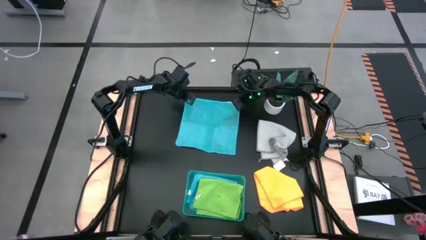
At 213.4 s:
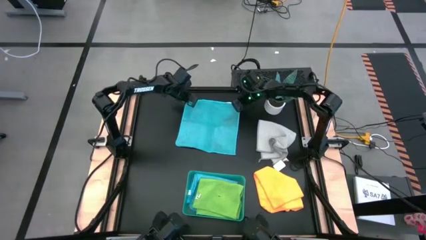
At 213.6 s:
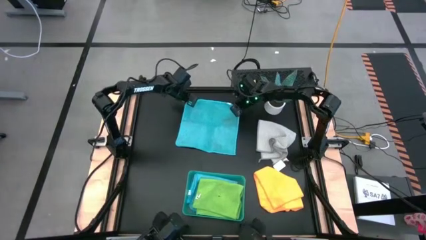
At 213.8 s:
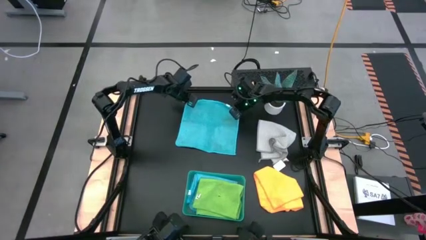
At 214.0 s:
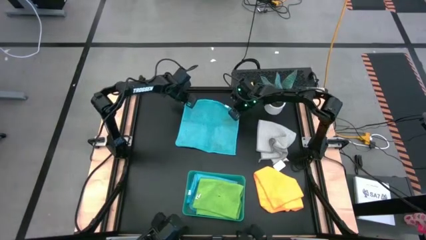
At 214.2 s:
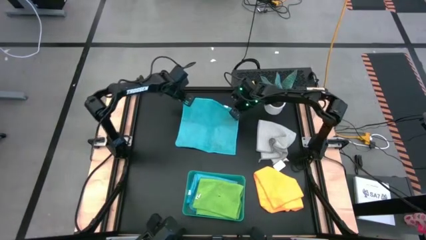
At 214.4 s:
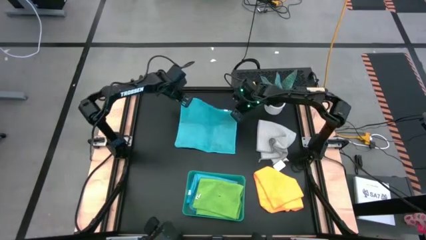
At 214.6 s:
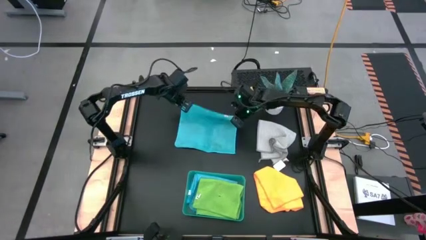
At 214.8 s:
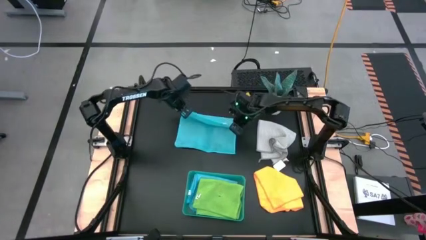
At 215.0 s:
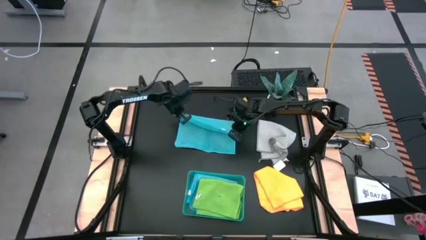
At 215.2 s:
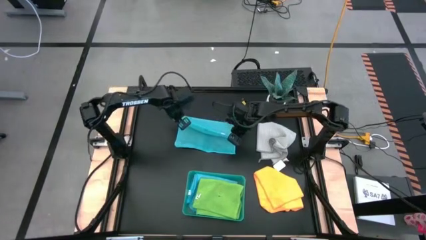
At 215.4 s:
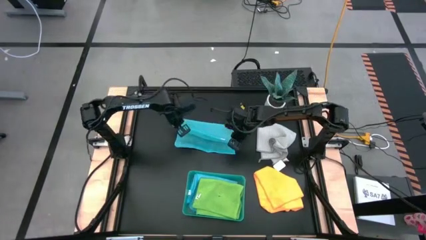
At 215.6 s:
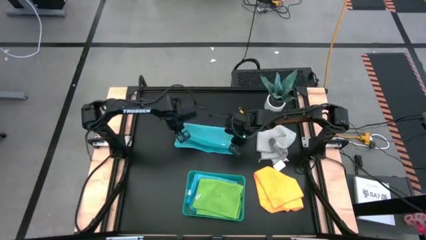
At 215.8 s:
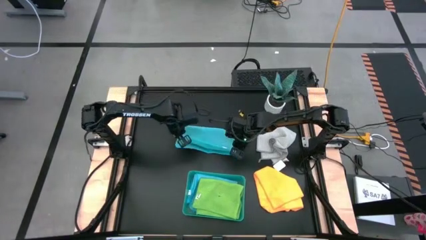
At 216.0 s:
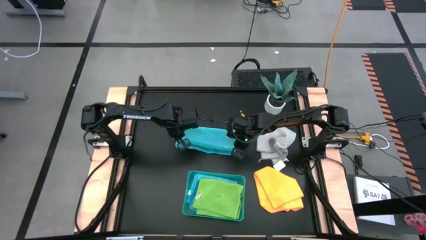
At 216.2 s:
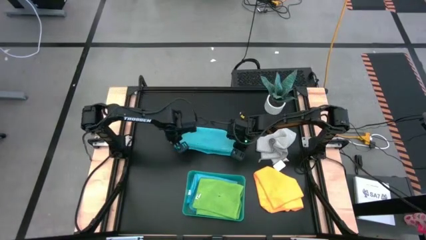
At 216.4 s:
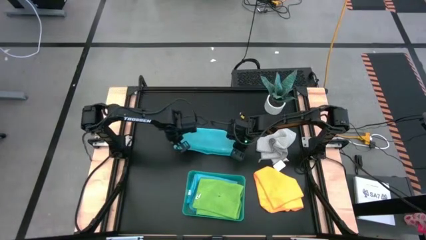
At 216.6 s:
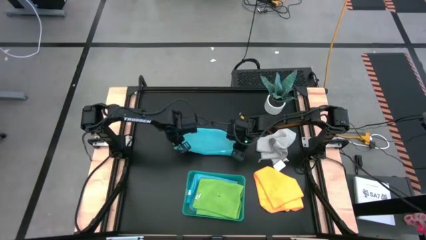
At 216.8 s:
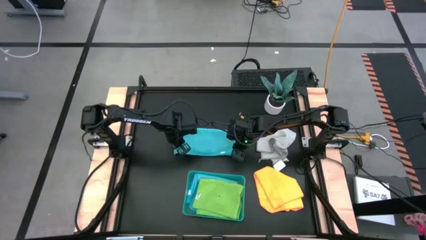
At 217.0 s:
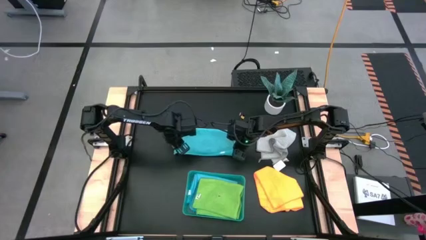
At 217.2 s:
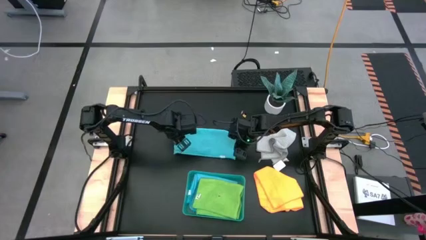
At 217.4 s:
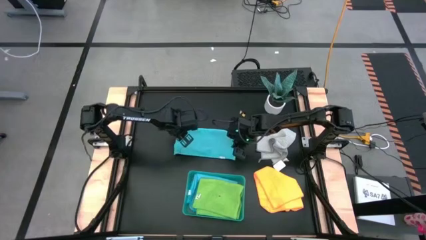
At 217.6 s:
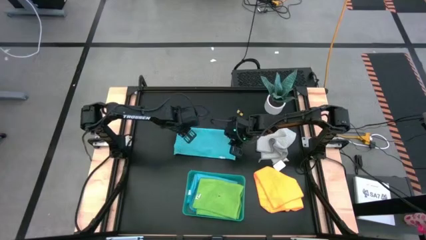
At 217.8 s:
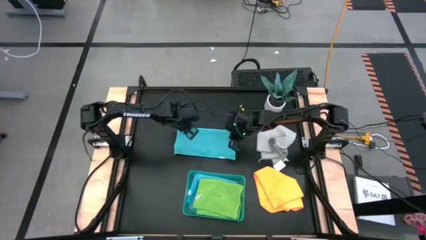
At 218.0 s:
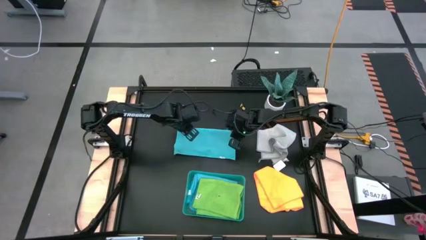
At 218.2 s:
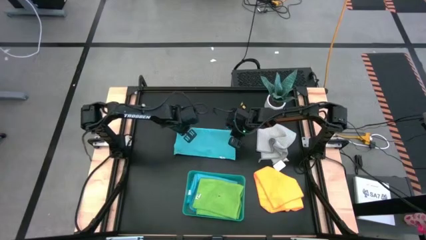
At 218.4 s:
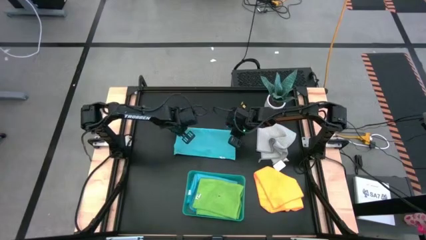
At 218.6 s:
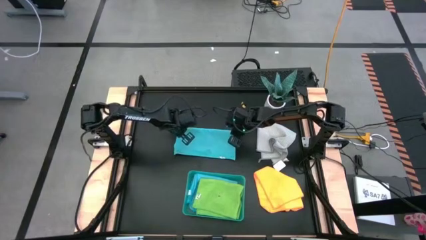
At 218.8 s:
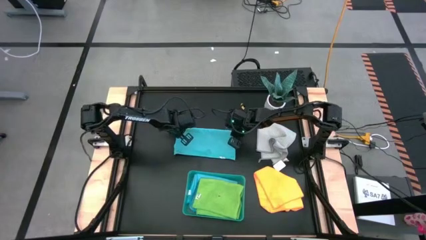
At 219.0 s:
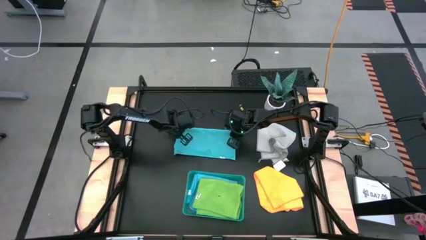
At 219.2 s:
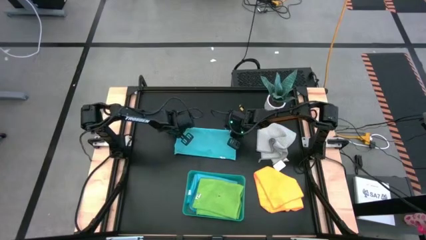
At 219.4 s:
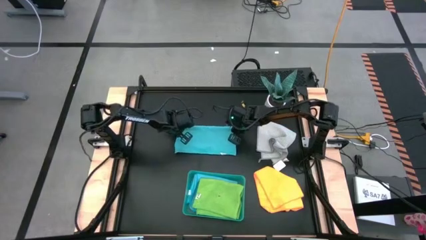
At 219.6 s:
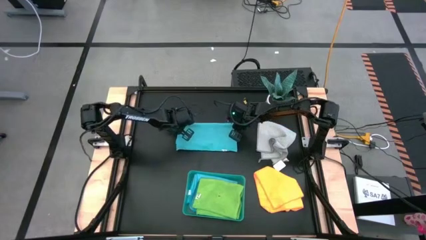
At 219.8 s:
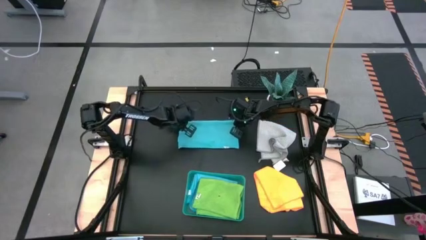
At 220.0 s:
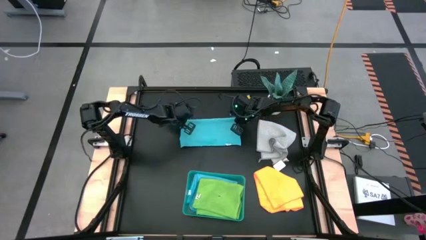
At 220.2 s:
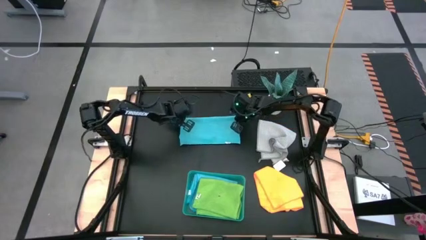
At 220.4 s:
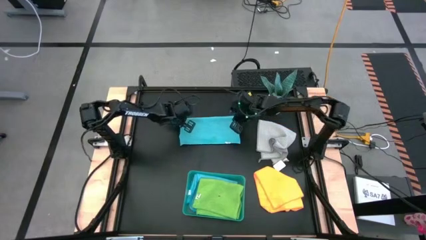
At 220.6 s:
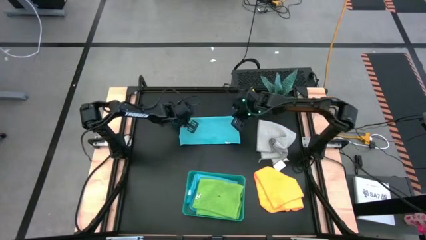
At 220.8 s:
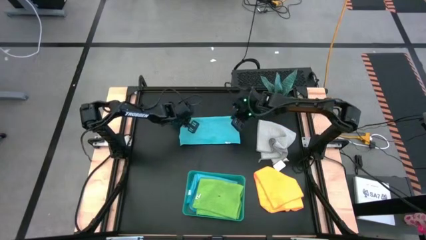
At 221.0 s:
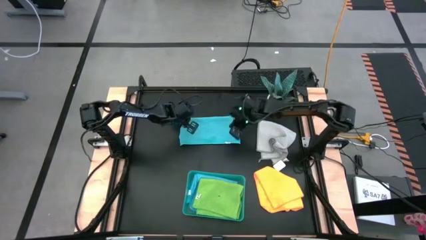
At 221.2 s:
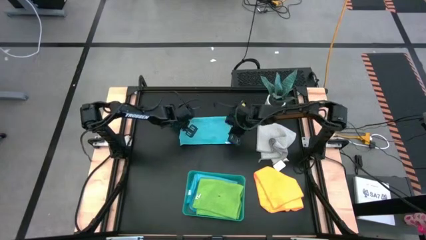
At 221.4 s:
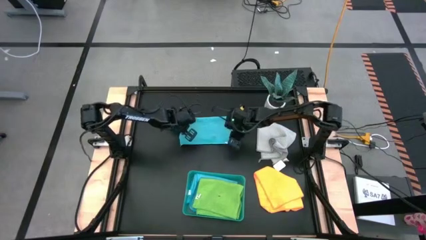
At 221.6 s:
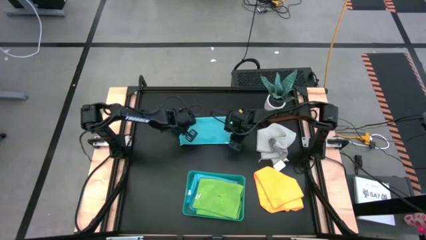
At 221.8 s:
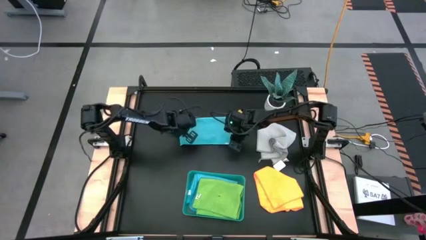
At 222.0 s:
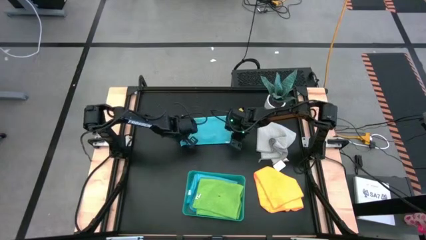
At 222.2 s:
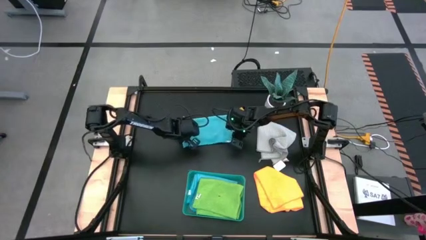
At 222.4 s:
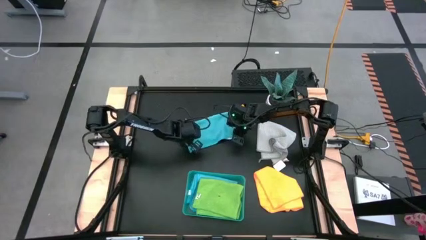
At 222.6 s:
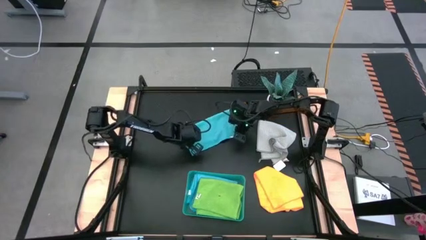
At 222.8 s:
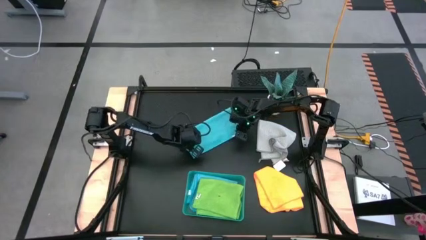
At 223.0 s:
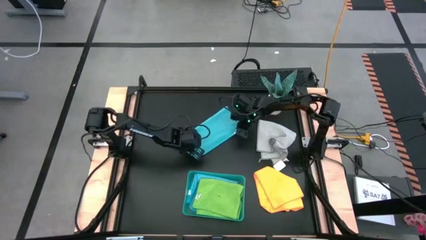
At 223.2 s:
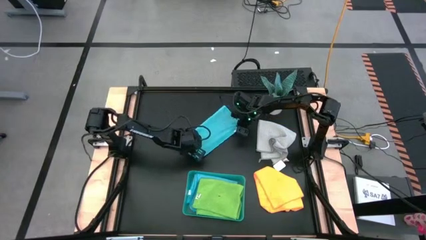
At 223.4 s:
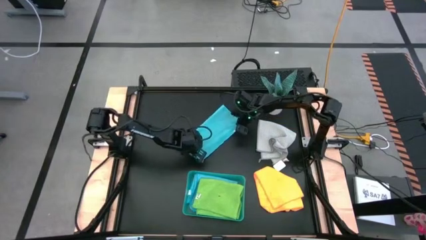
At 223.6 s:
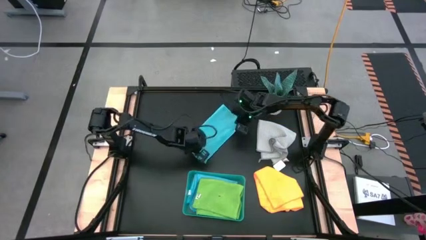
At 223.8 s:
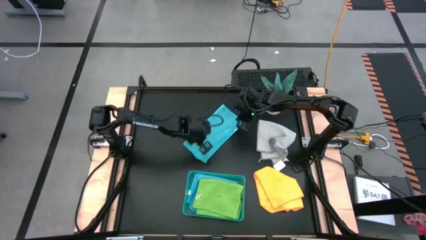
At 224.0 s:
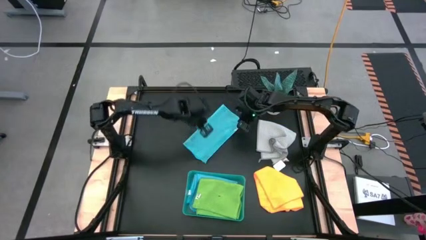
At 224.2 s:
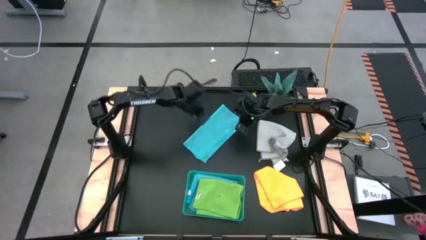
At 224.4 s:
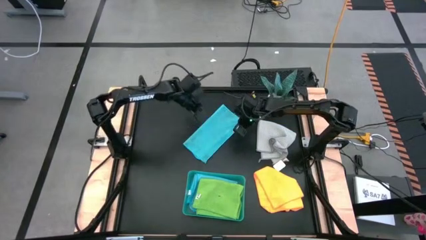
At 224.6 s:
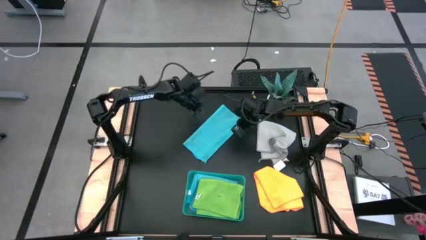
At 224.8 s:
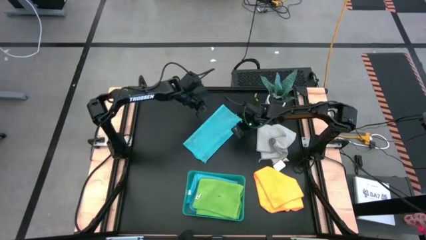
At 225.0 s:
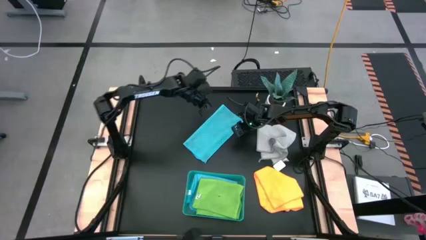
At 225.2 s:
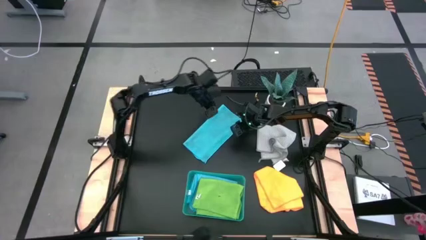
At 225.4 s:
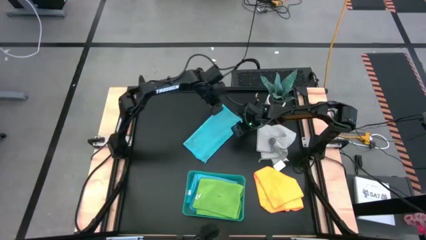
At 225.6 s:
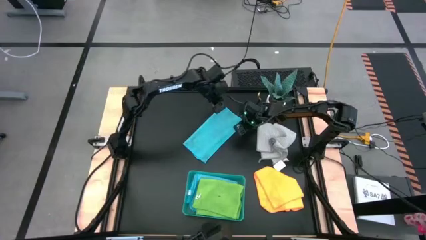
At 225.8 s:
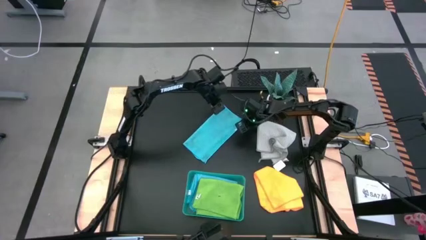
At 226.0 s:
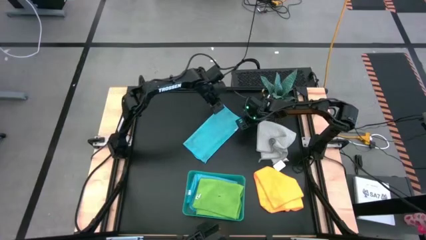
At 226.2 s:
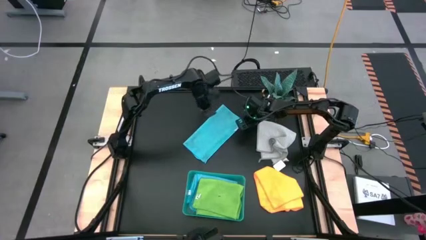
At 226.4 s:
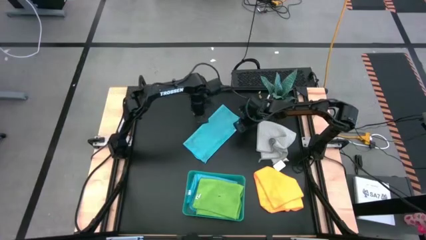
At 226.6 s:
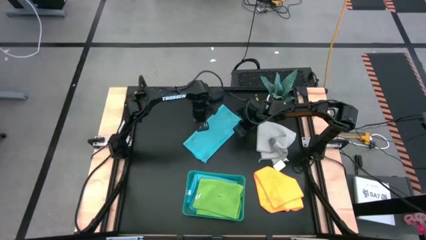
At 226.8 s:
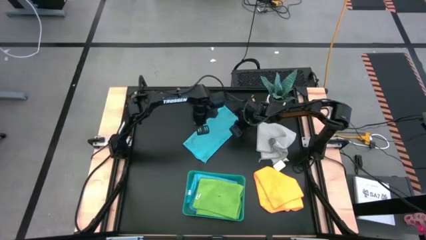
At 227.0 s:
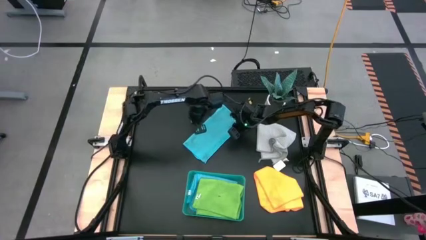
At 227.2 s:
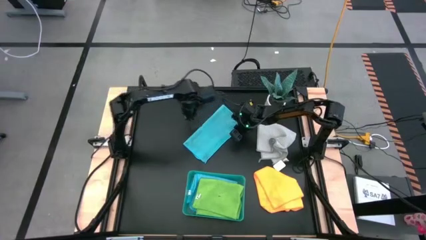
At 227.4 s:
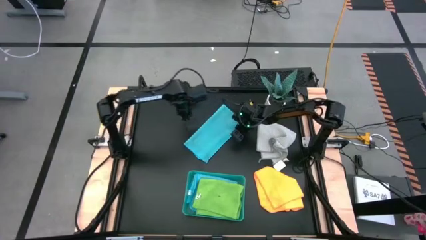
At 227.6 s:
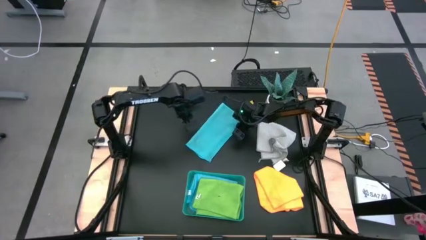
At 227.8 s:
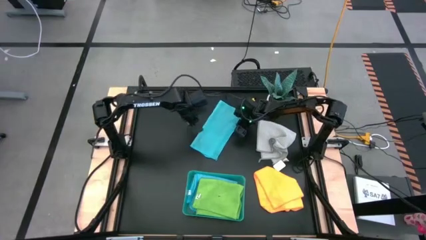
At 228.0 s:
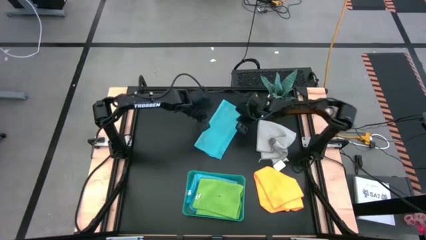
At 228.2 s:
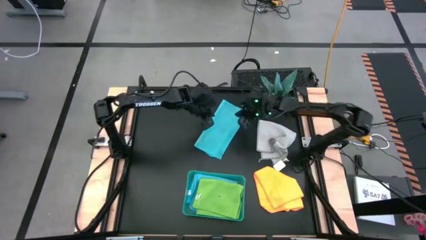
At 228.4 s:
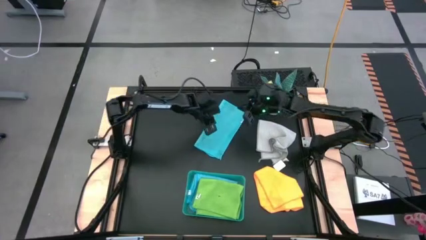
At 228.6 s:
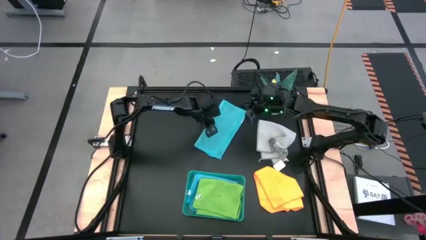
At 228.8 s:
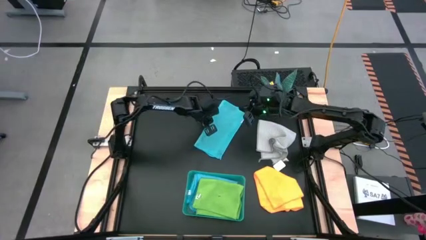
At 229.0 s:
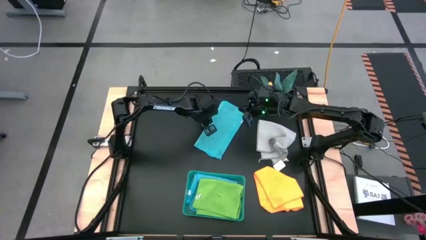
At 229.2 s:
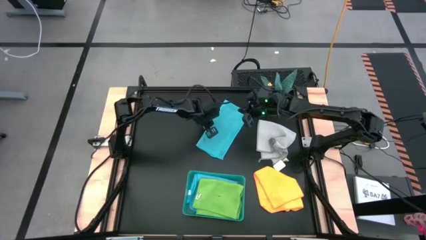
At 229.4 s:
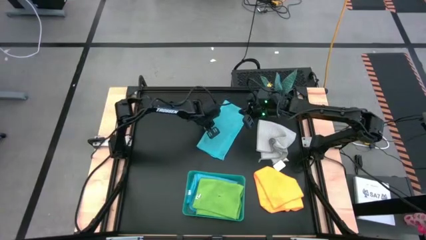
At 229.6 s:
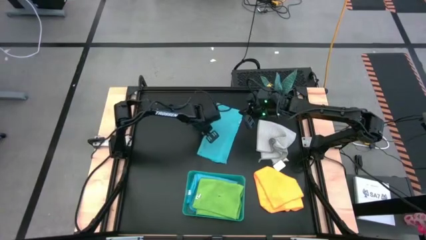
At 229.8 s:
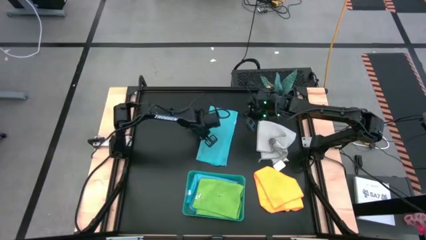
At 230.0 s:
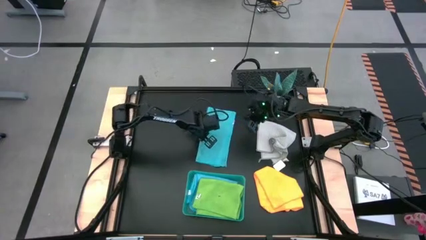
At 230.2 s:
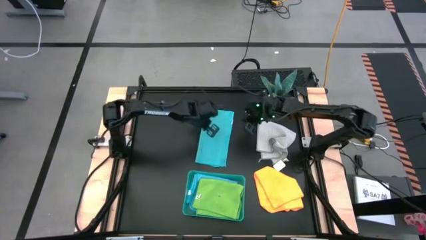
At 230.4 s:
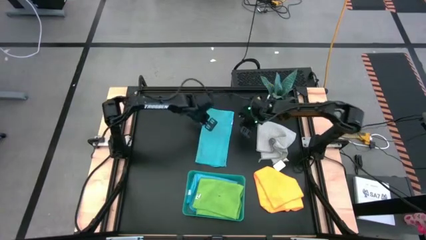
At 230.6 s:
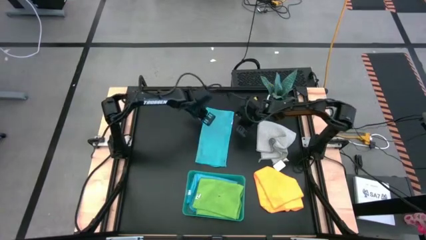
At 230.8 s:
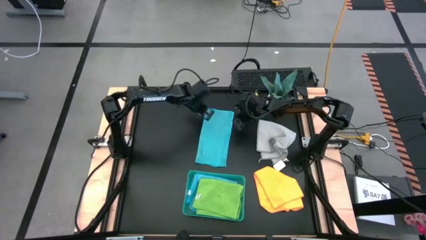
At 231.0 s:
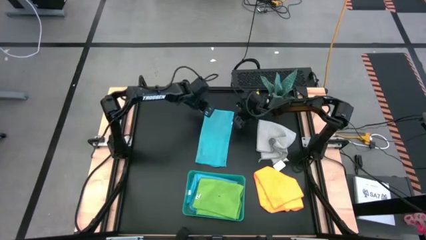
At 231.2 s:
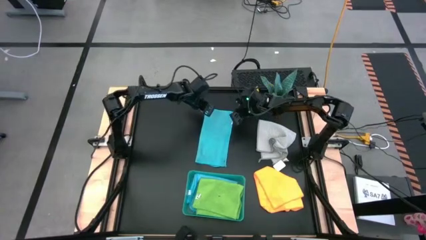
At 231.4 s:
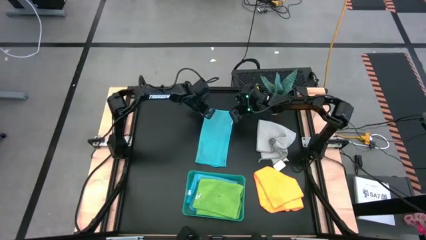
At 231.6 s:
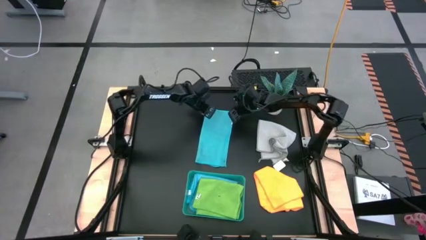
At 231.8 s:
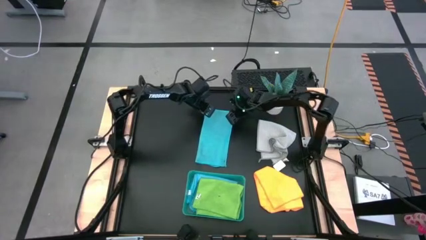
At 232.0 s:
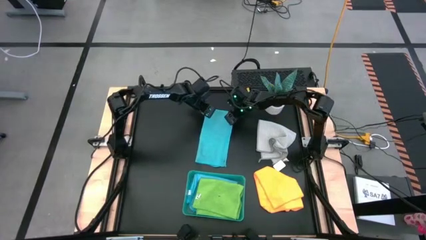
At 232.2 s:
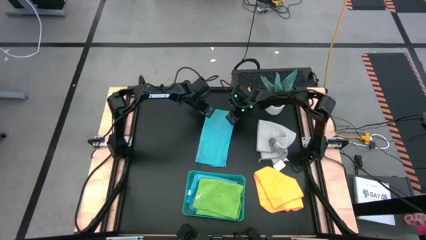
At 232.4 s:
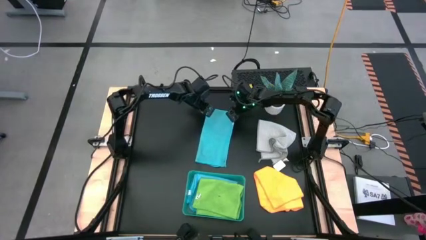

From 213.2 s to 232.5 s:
Task: Fold microfiber towels
Fold the blue microfiber cloth
